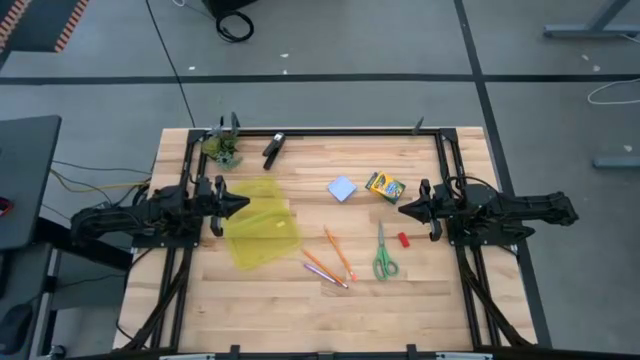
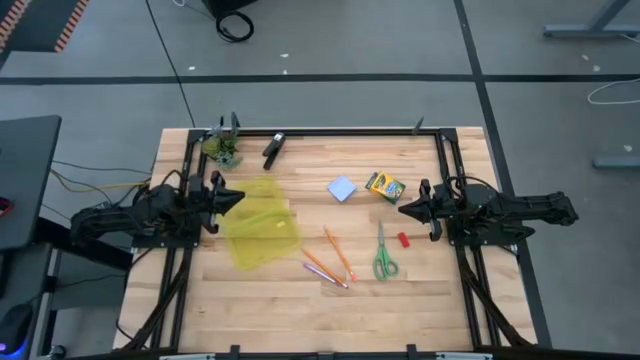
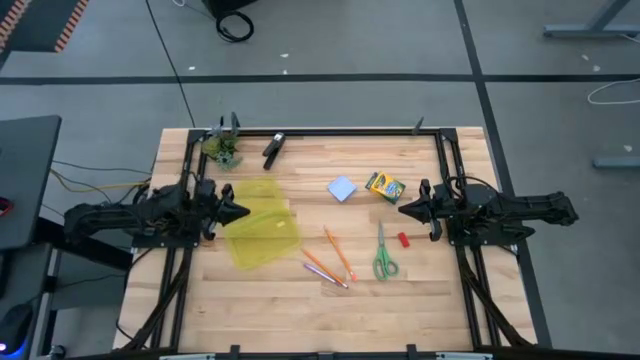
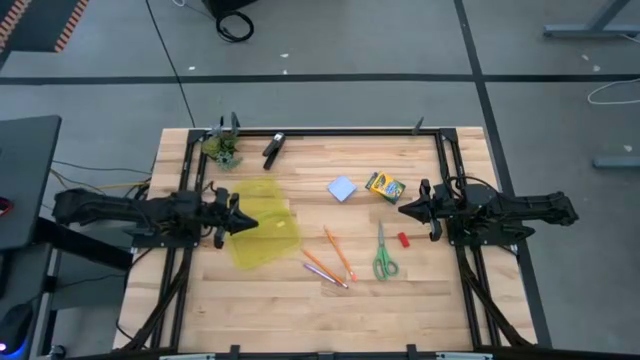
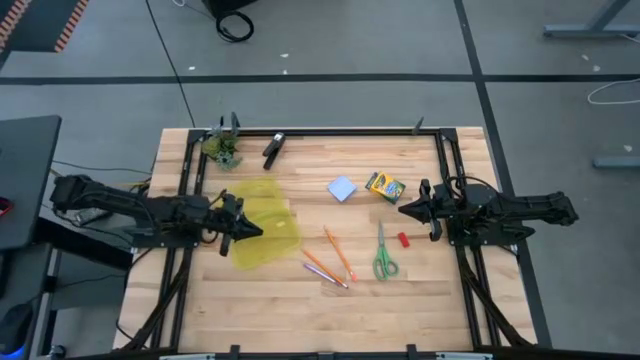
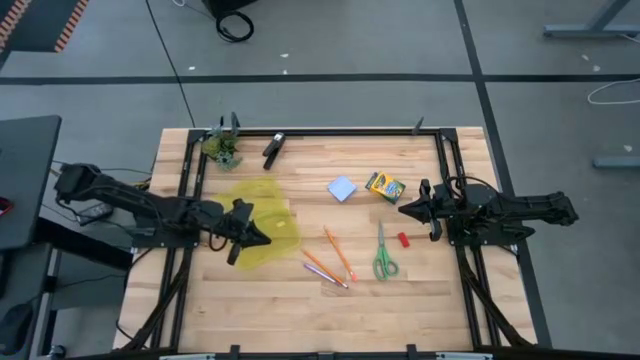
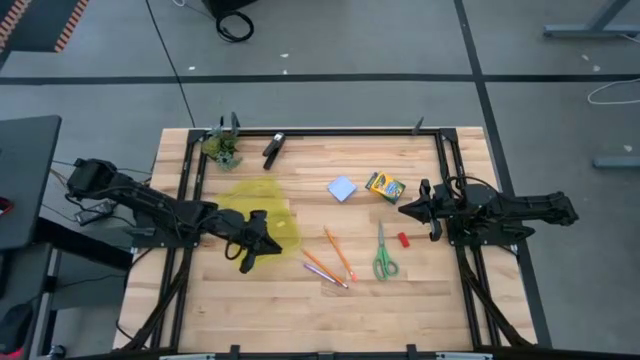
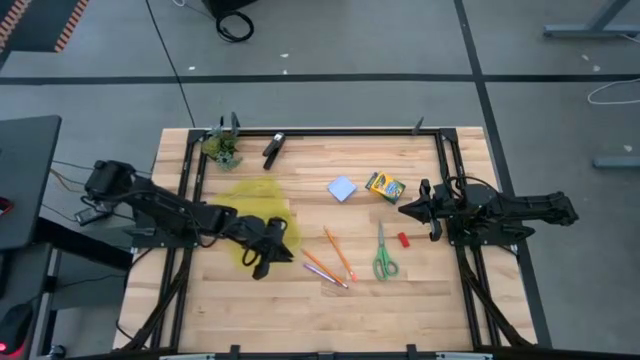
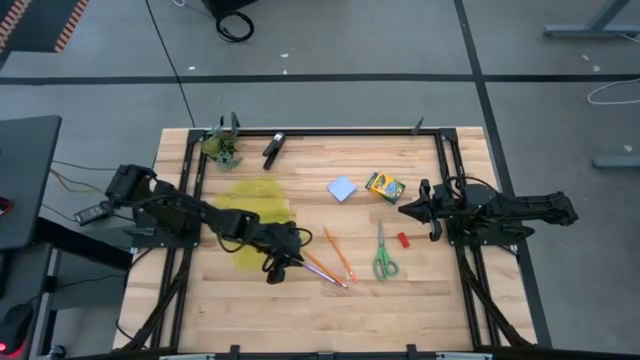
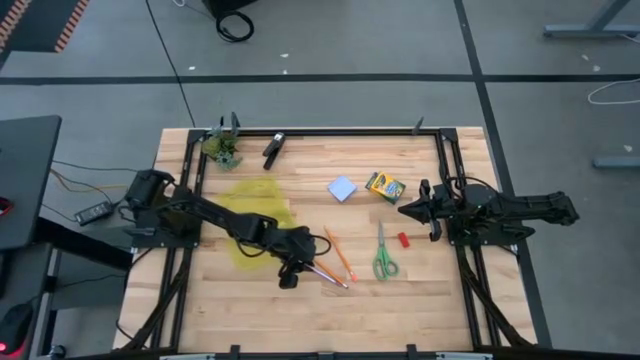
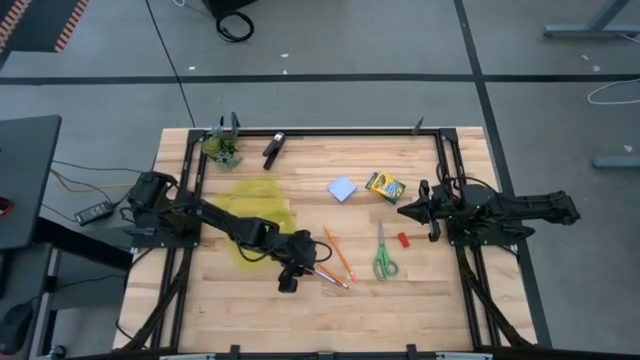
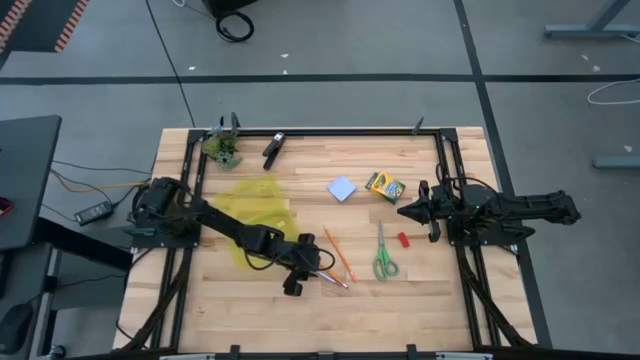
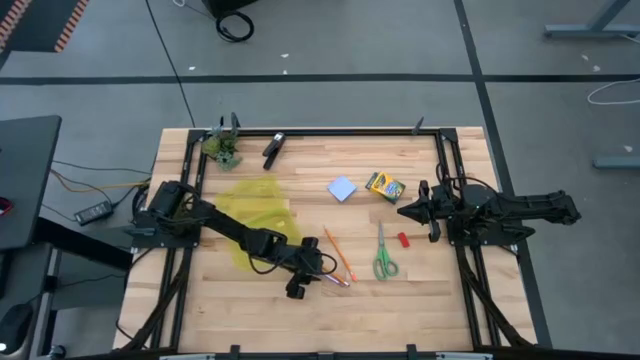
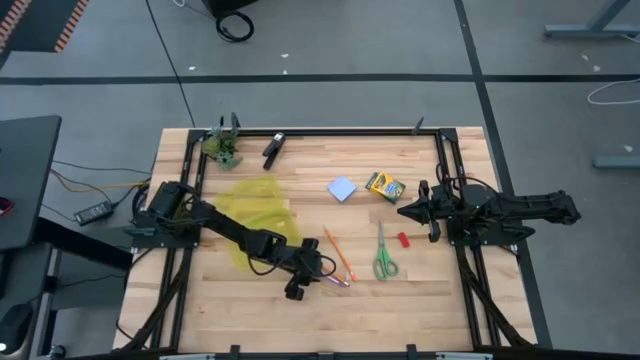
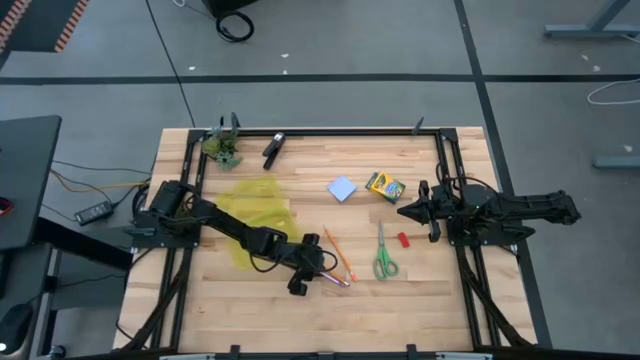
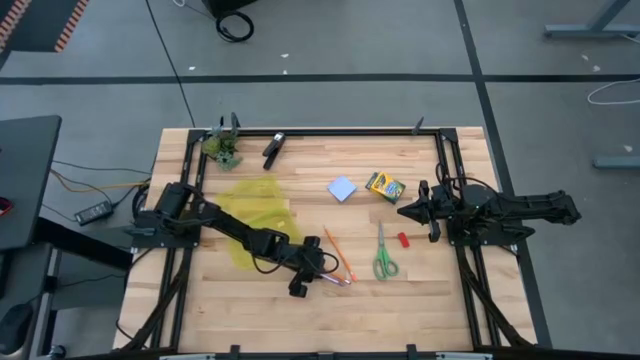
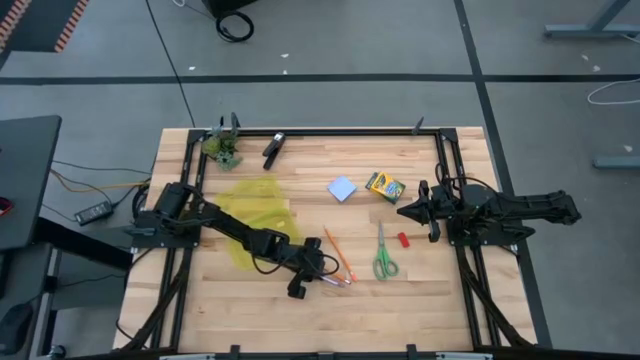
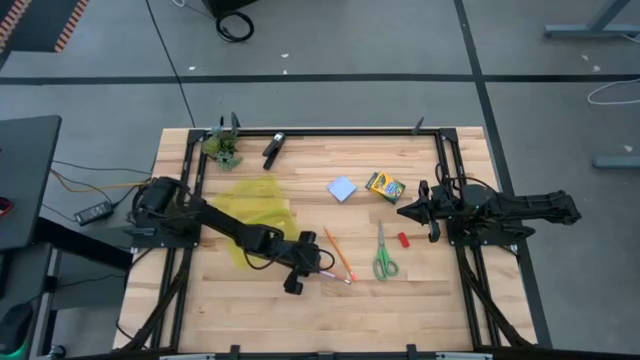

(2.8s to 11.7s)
Task: Pack school essentials
Put the violet pen into the yellow supply box

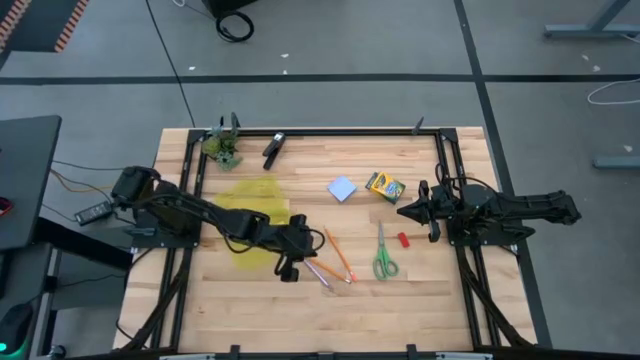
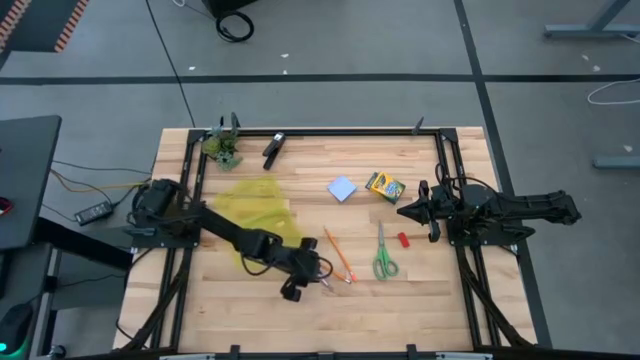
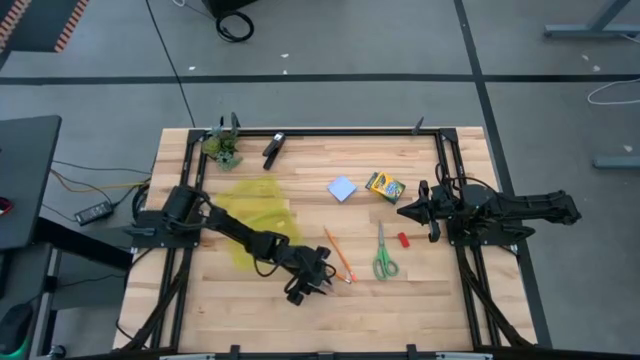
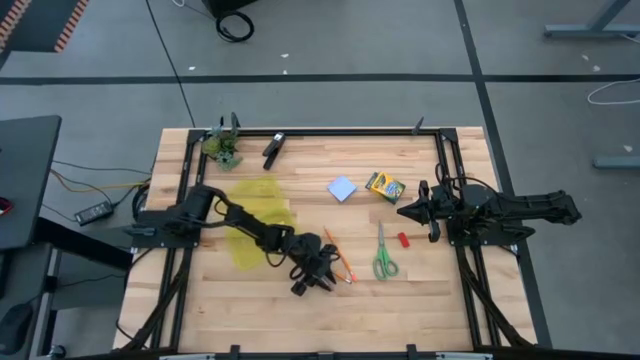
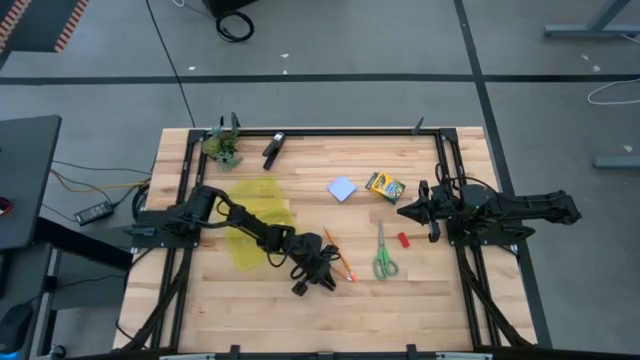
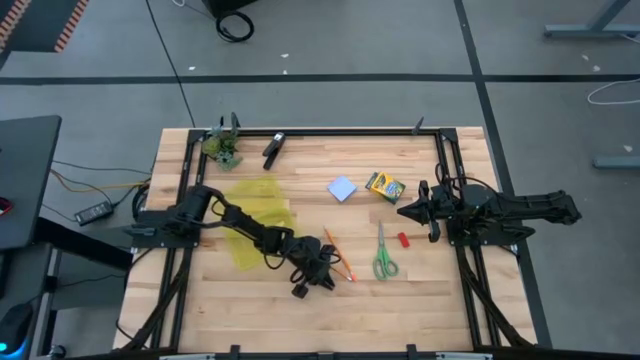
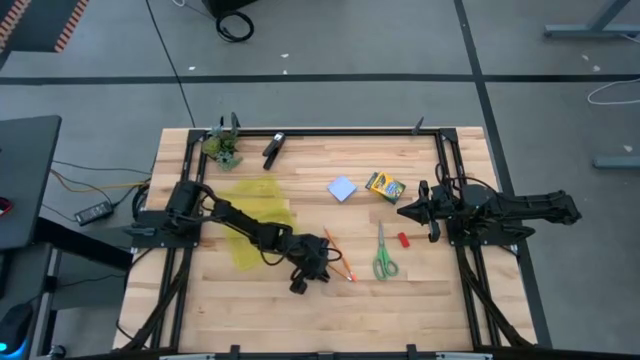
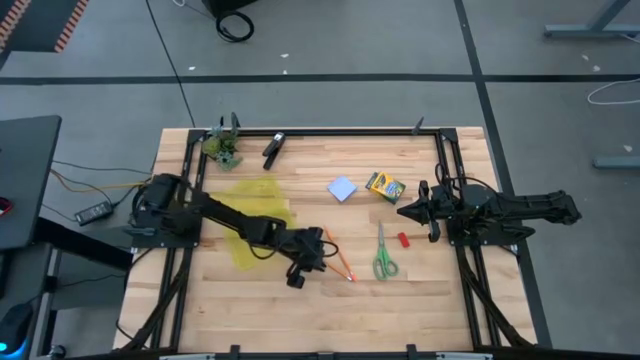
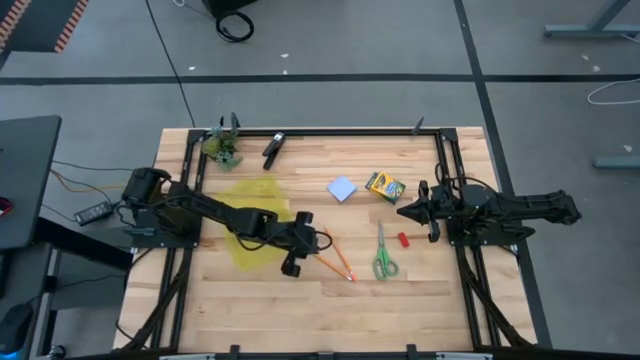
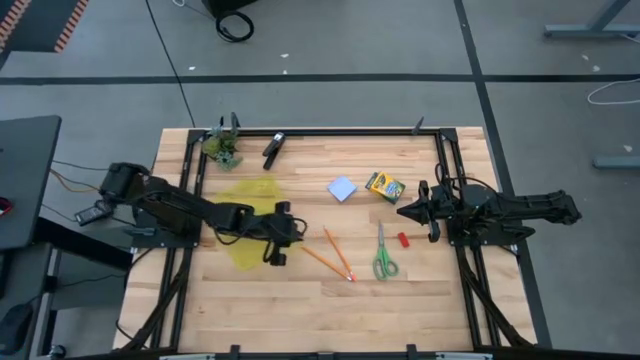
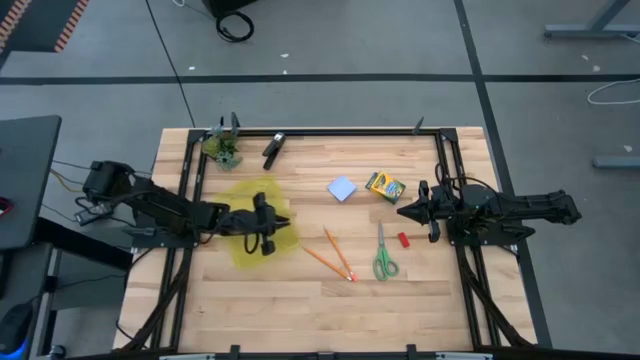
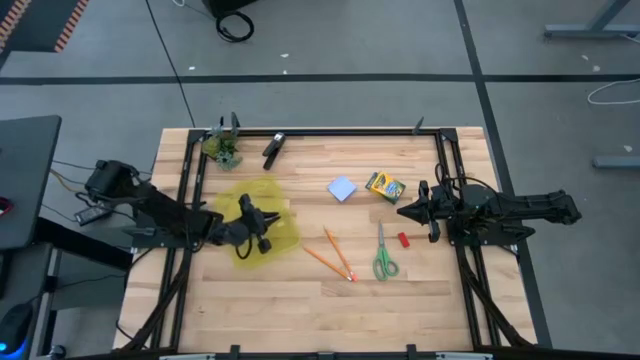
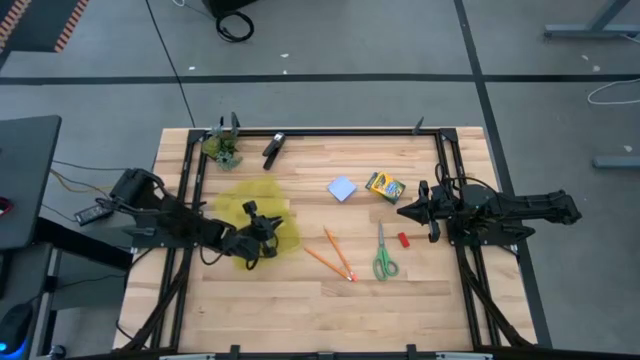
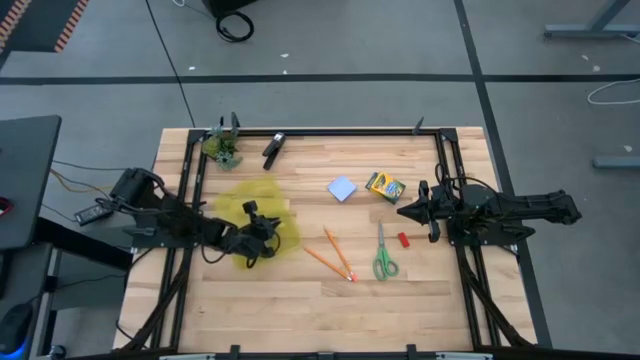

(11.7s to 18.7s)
Put the violet pen into the yellow supply box

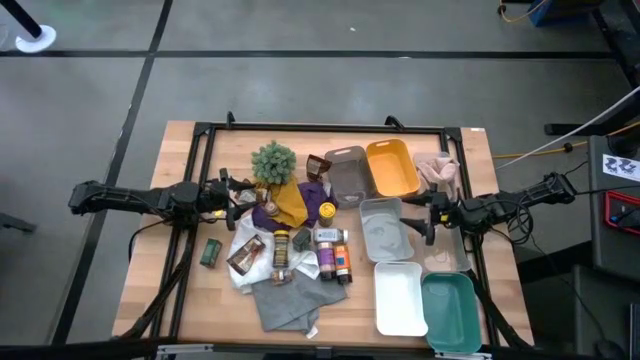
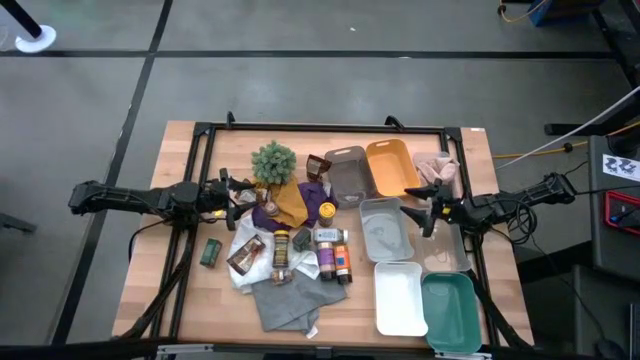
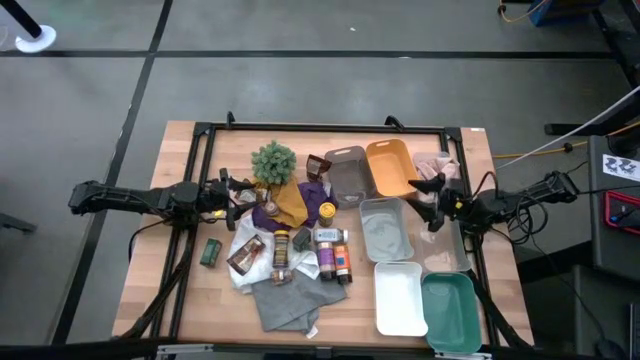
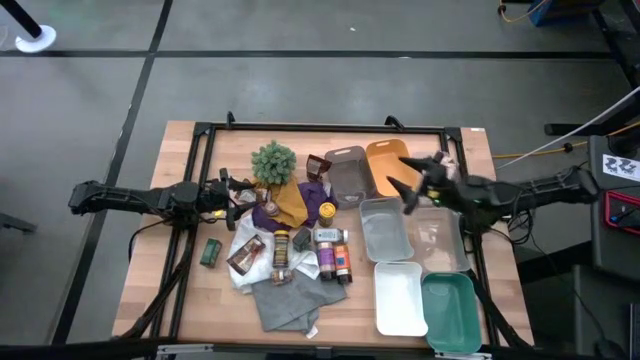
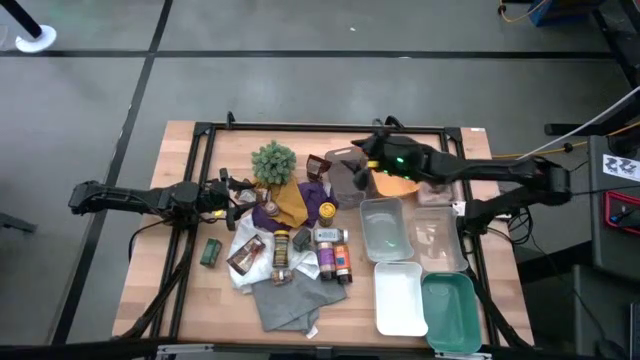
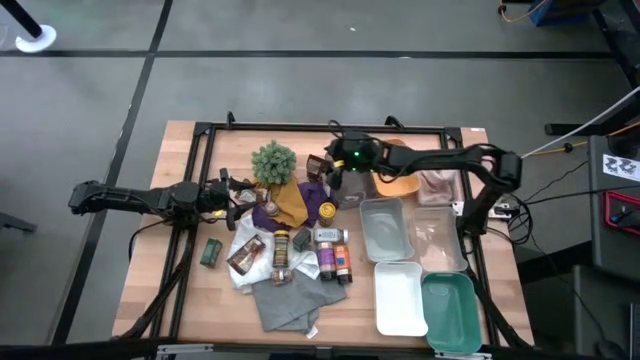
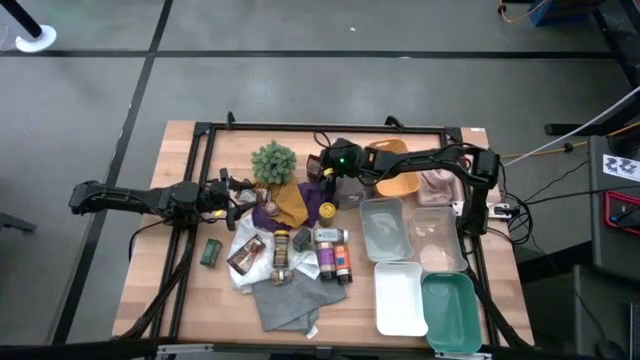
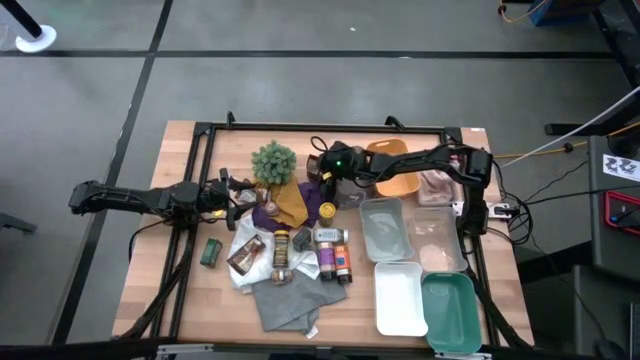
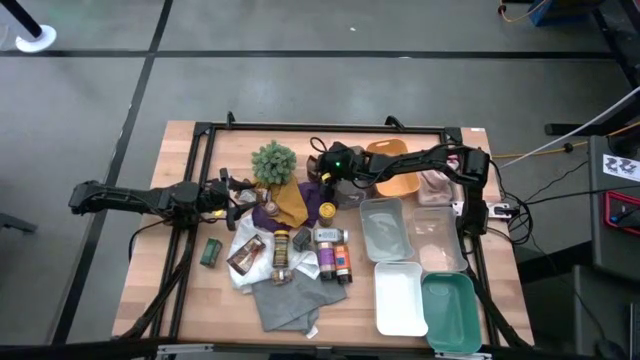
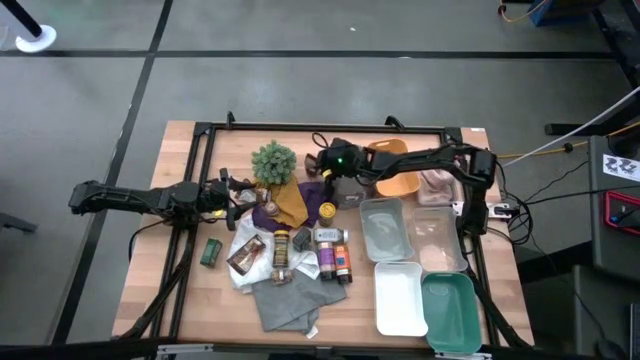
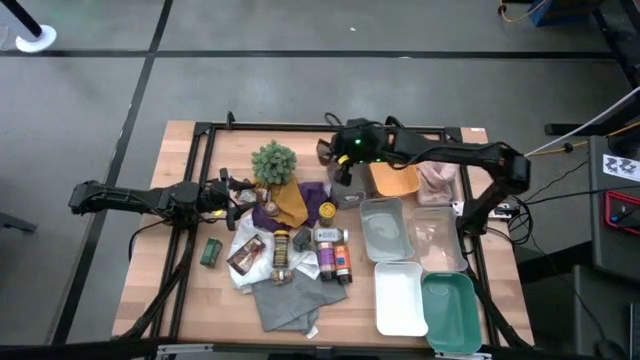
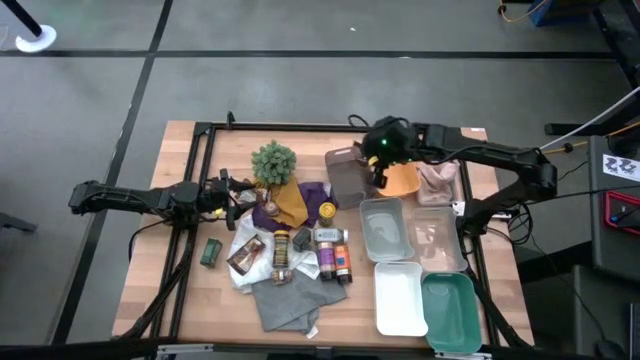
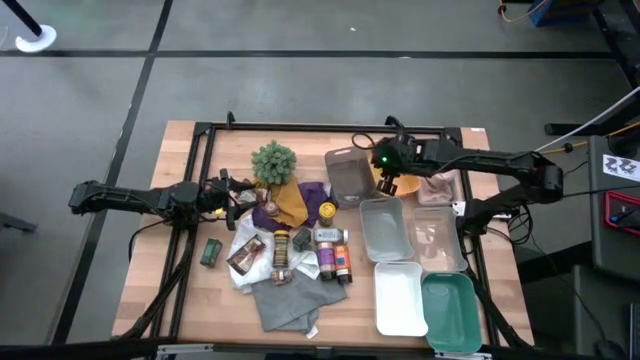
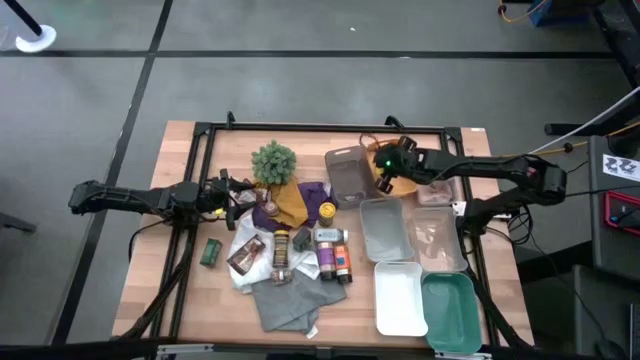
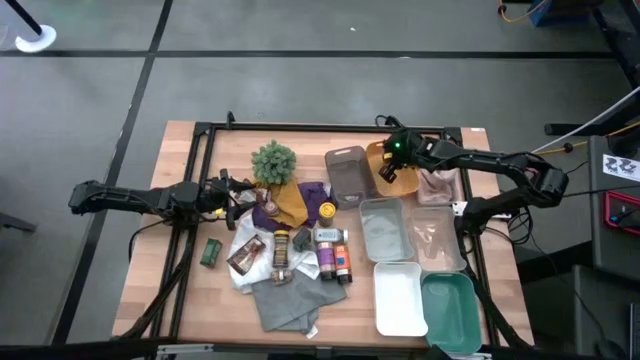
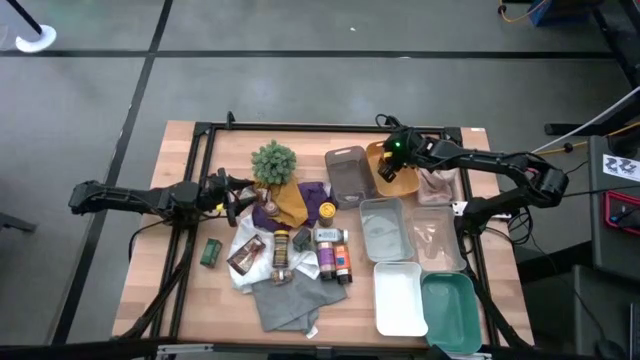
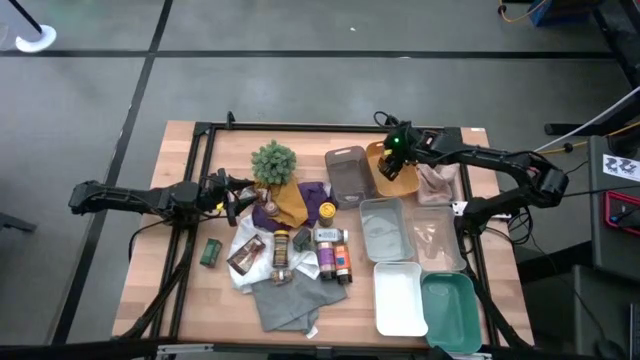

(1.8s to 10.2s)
Task: Sort spices by type
Put the top right orange seasoning pack into the yellow bin
